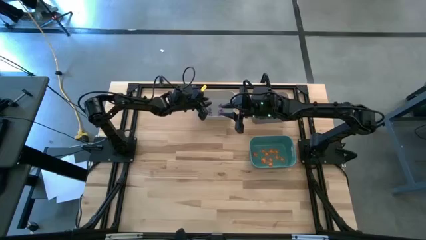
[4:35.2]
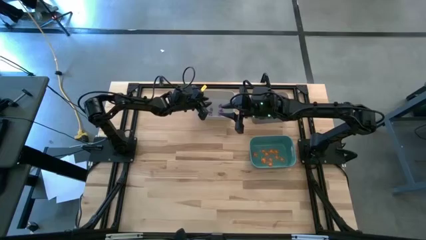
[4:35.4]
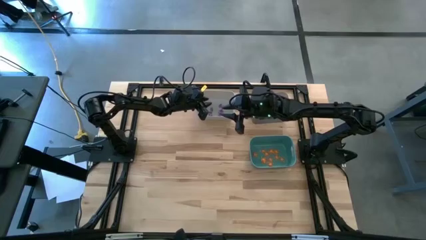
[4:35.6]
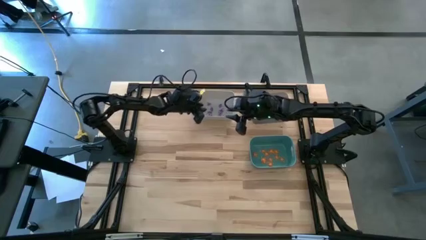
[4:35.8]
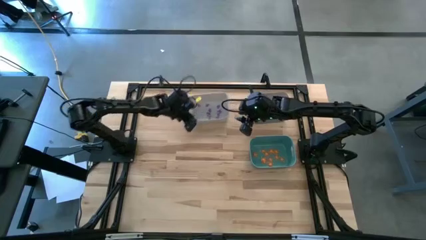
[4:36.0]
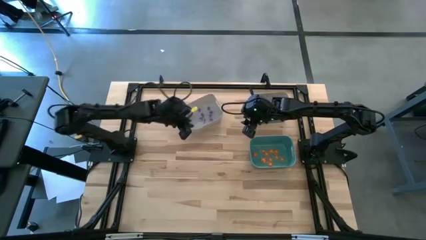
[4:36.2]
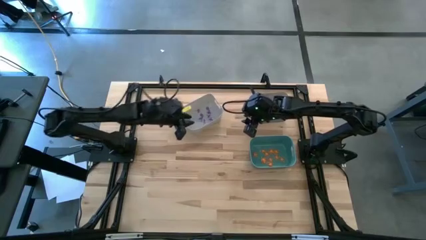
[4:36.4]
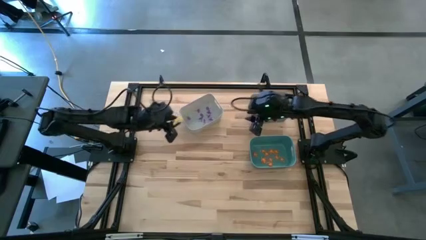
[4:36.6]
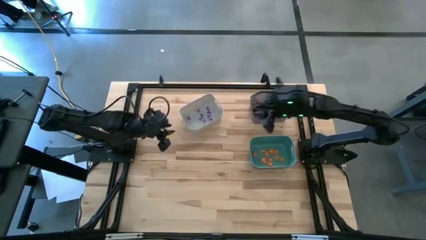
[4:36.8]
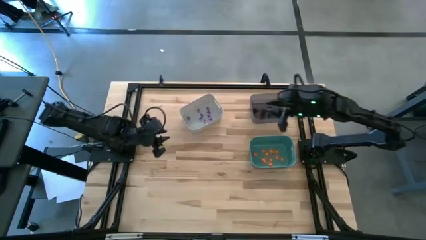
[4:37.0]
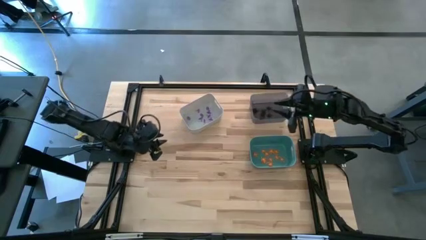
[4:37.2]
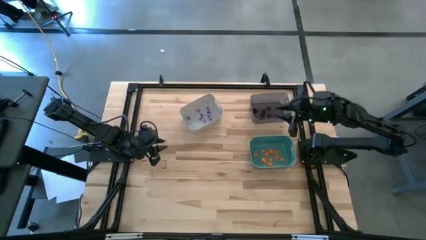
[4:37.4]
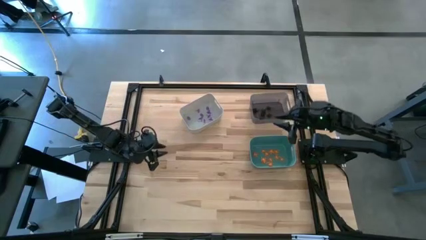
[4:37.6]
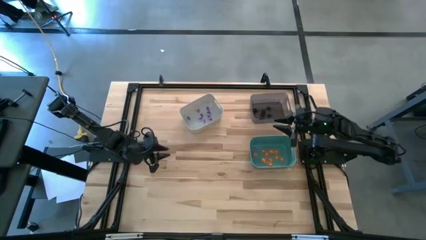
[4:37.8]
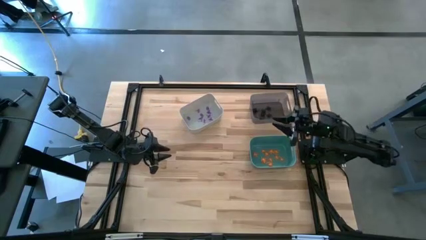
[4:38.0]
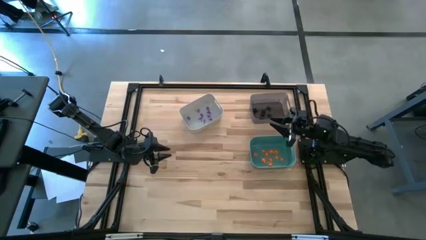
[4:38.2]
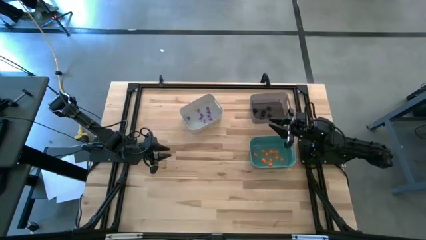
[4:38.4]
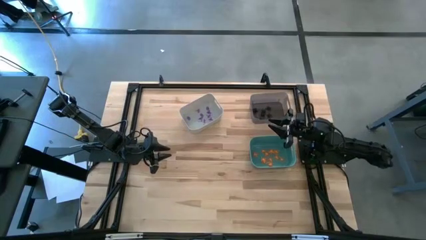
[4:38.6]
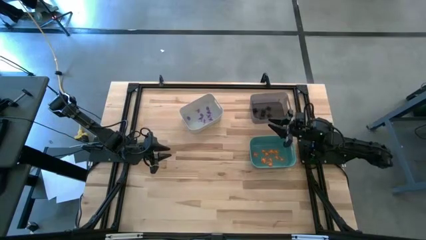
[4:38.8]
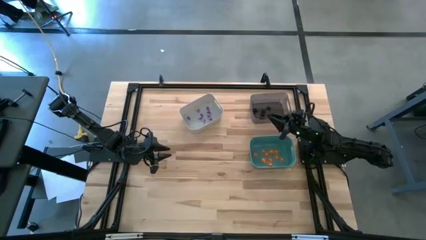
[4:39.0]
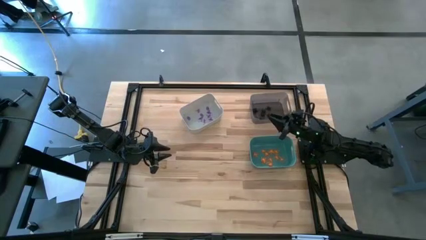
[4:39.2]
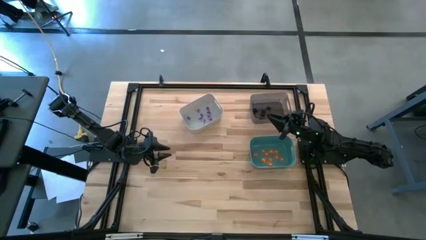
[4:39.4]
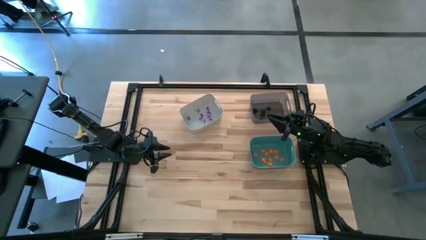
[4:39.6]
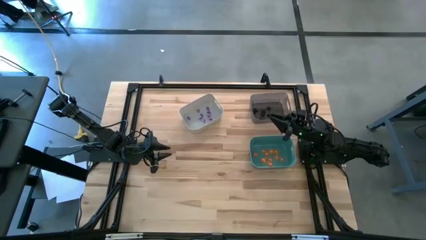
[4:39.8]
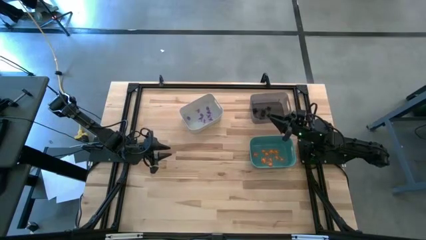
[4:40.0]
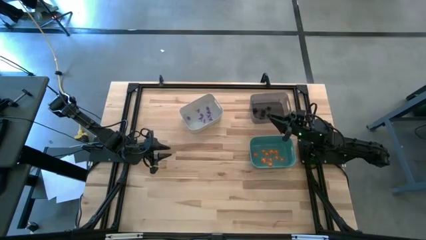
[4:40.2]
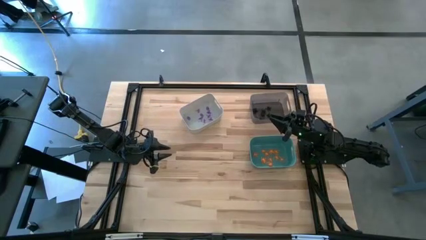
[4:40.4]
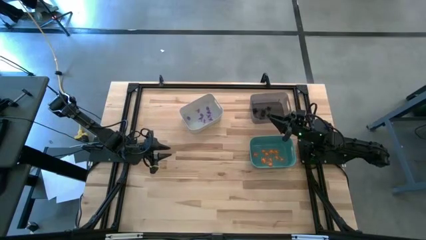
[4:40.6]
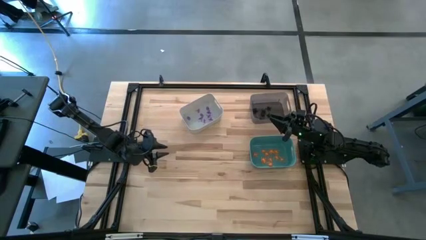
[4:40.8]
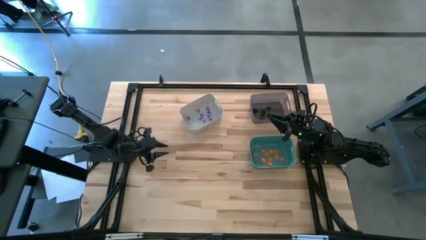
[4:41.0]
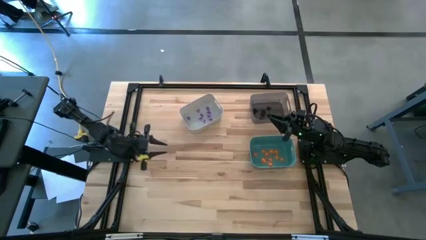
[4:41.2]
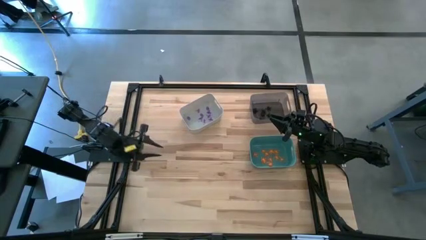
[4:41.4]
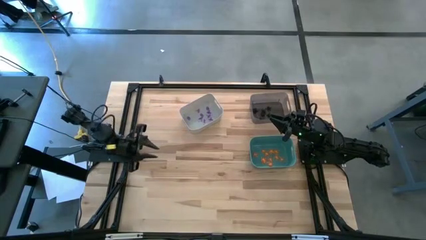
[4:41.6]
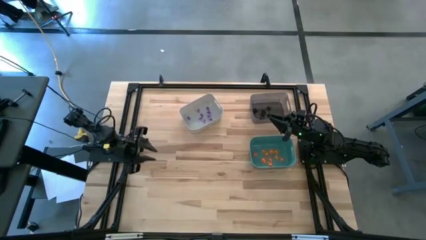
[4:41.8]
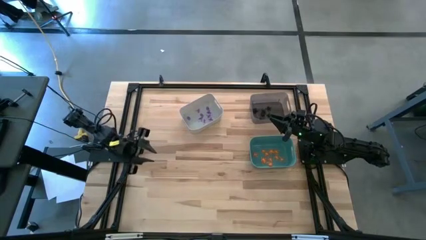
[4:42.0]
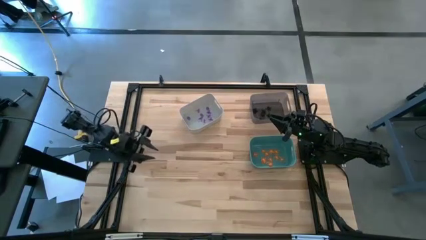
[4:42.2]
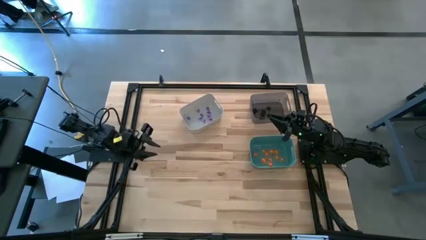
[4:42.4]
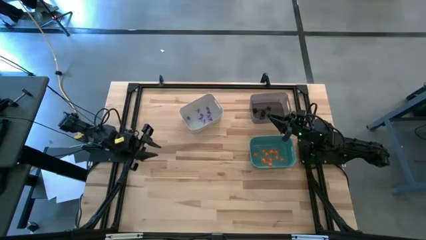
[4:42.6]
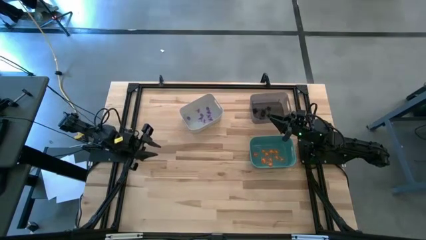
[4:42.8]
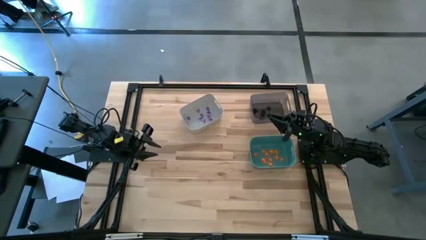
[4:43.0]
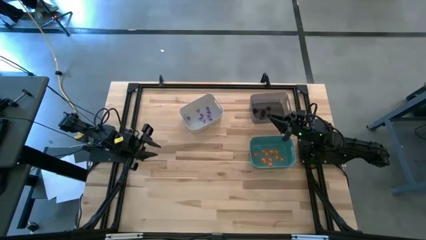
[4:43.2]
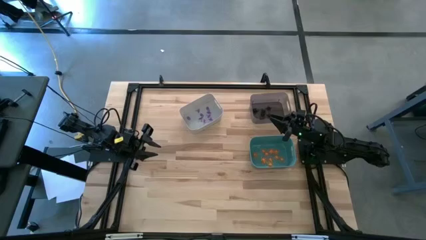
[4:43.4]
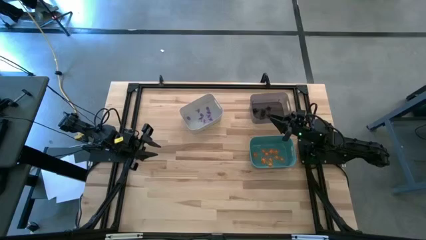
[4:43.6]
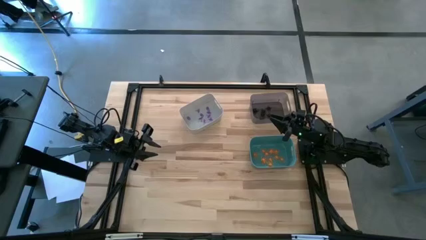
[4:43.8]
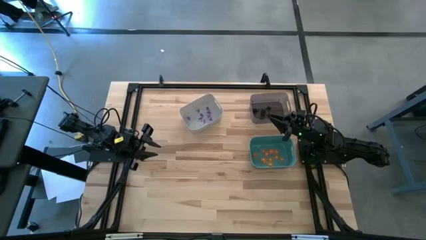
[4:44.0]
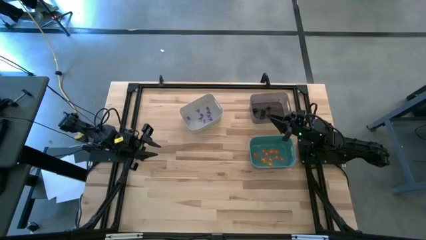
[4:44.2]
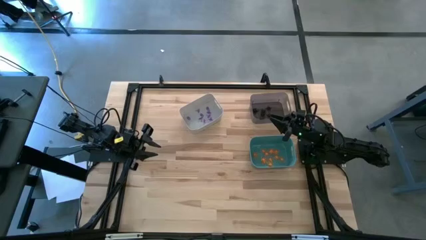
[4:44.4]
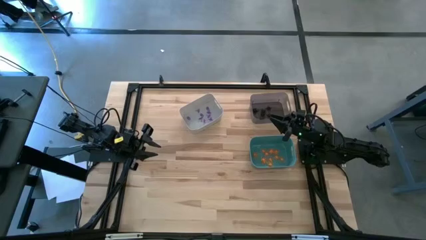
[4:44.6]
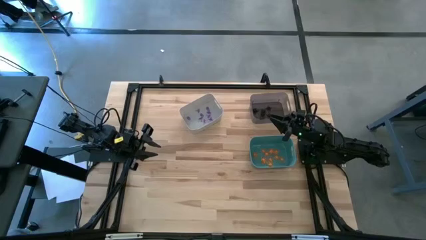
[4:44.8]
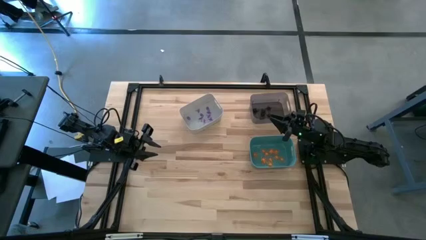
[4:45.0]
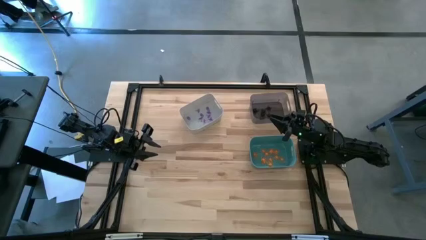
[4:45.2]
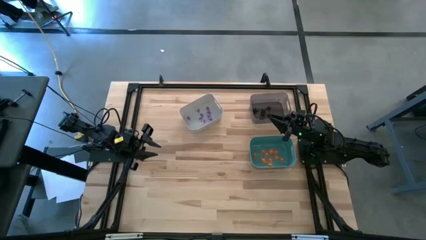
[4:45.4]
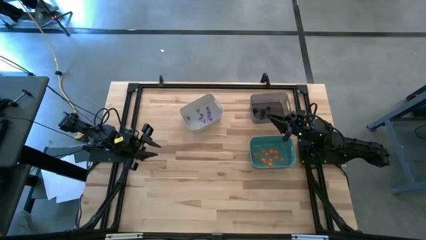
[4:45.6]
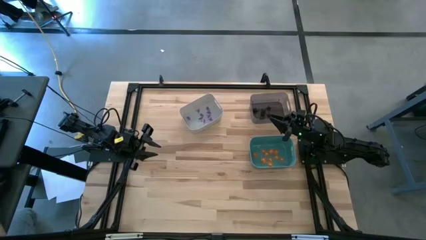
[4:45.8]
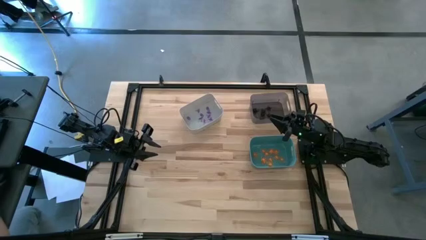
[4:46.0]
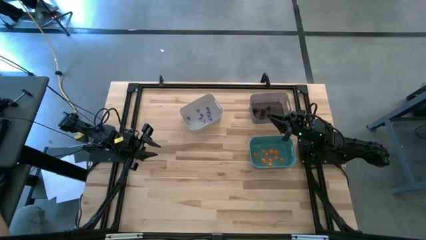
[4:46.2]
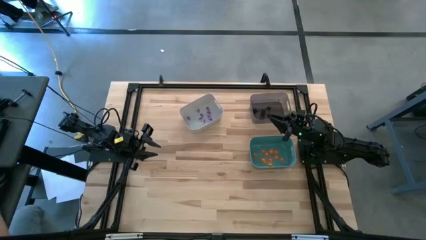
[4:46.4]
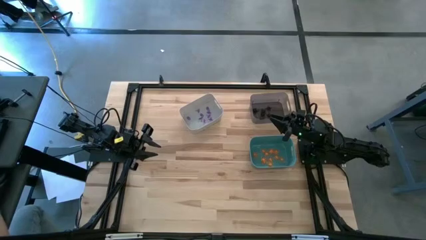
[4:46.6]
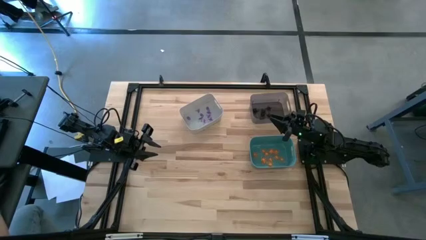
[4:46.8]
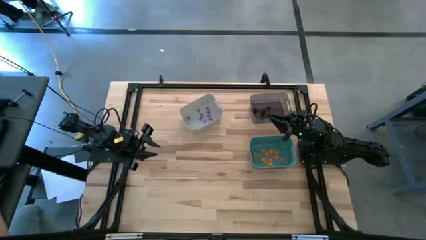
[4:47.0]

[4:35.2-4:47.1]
Task: Sort Halloween decoration
Return to Home Position

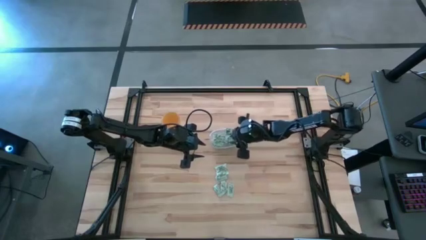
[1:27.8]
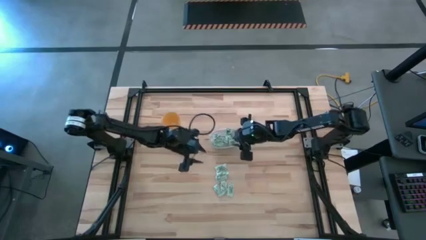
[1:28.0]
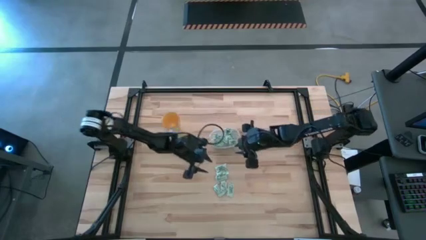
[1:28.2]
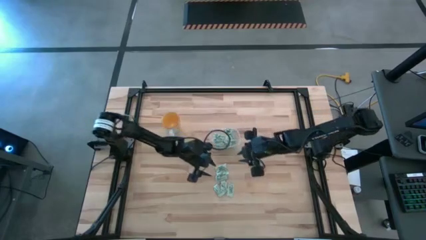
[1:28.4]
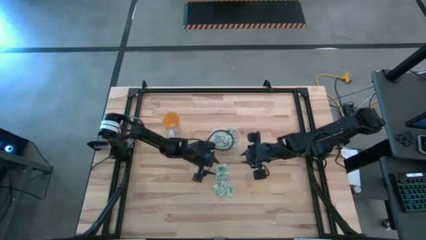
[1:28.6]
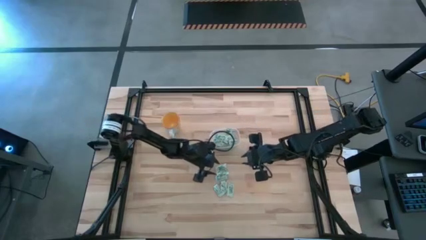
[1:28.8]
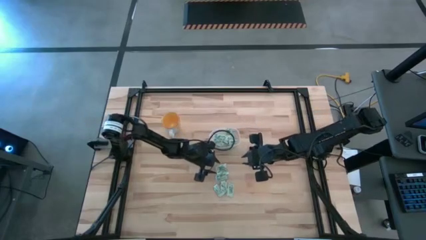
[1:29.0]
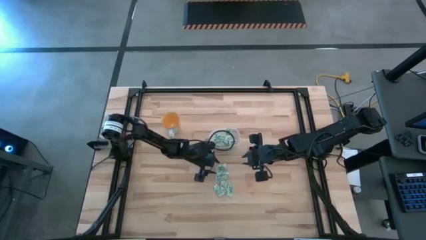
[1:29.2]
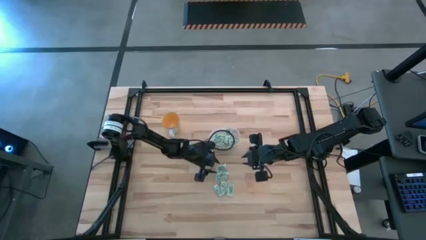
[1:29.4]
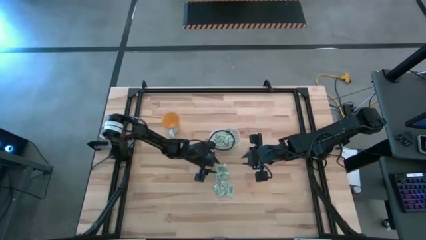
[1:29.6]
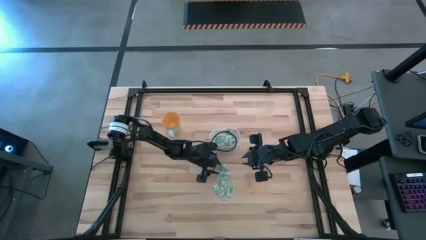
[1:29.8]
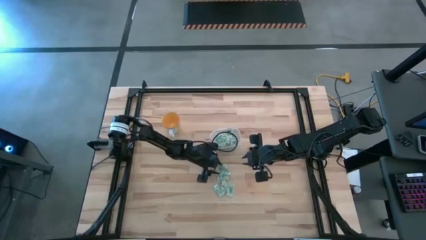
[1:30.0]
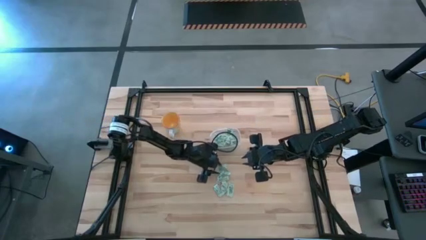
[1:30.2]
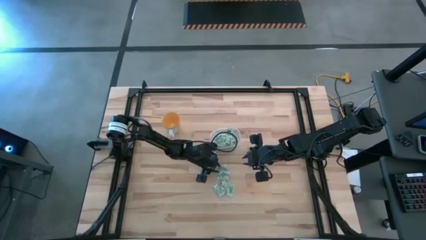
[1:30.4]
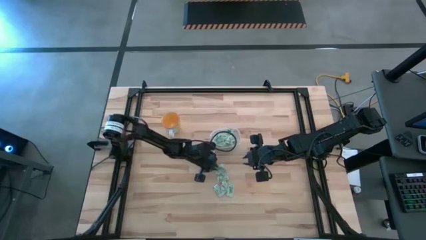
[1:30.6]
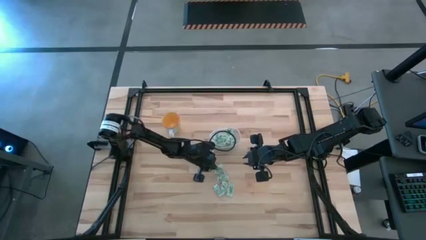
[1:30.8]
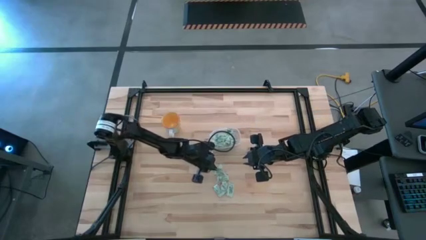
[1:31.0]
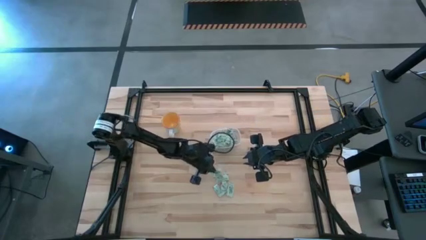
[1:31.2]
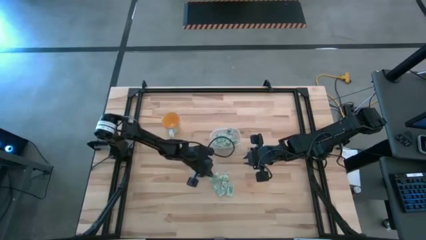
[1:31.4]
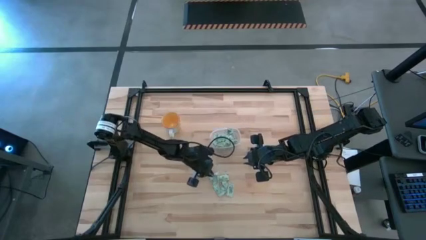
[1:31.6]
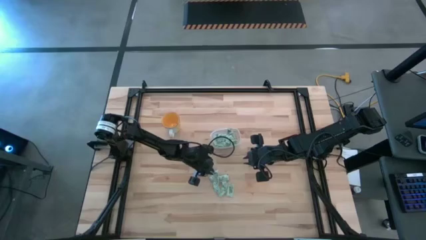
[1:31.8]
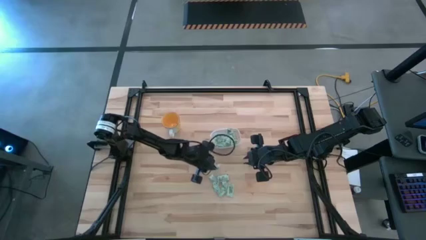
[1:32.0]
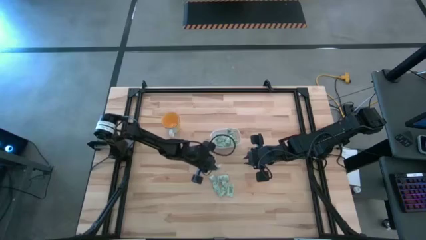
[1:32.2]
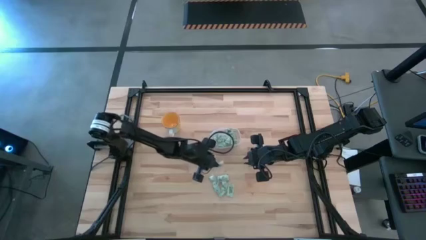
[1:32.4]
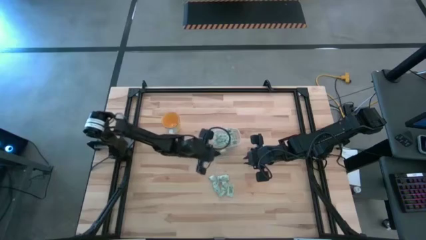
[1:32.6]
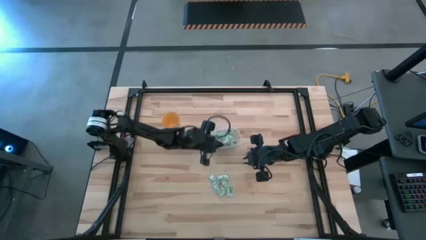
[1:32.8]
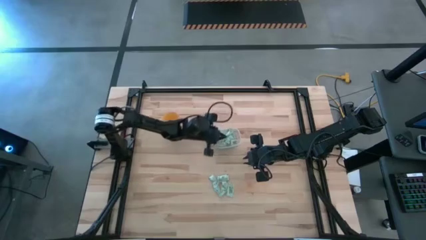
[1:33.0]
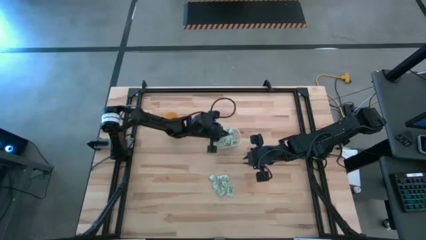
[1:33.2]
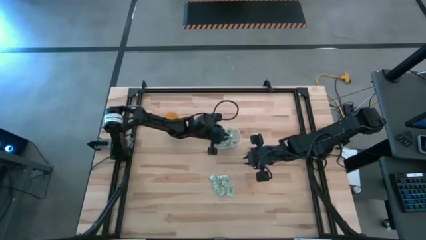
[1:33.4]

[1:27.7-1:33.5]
Task: Pick and place Stevia / Truvia into bins
Put the stevia packet into the transparent bin
